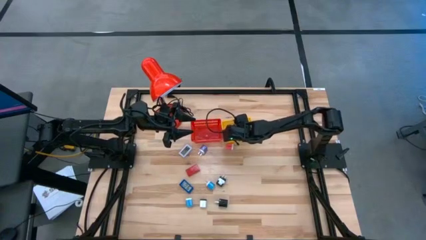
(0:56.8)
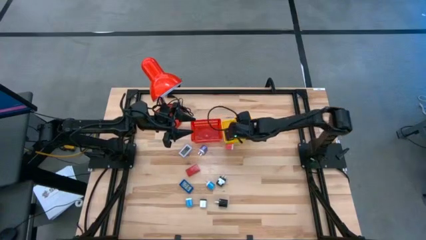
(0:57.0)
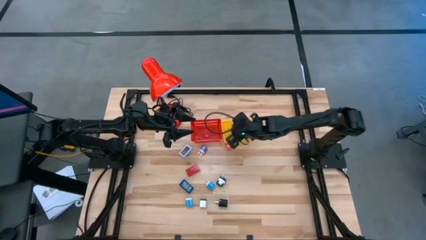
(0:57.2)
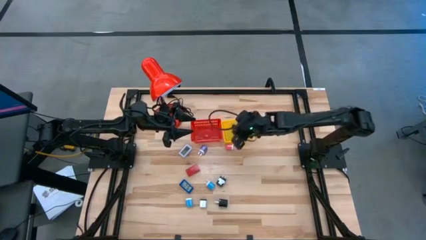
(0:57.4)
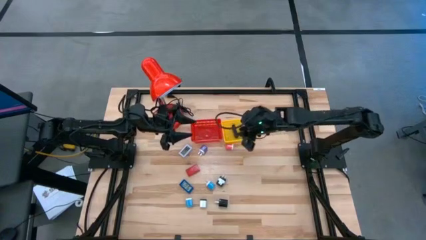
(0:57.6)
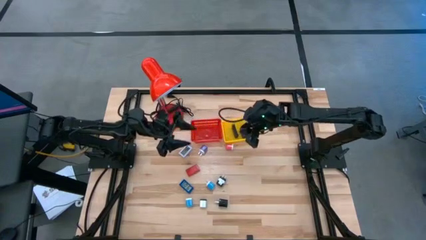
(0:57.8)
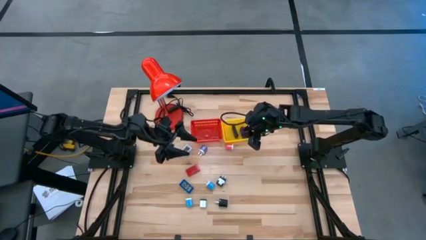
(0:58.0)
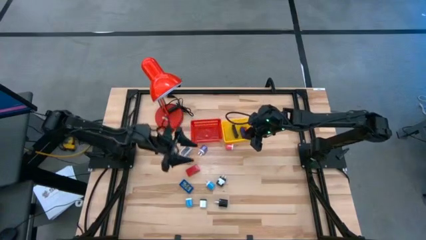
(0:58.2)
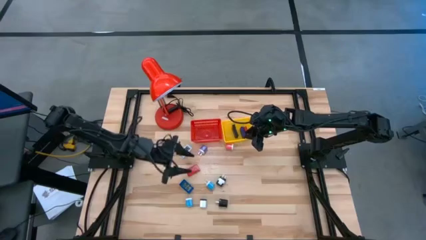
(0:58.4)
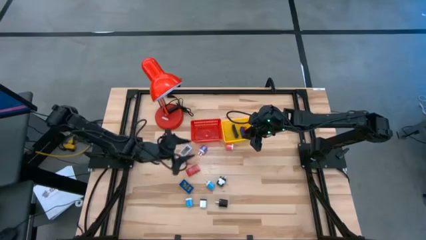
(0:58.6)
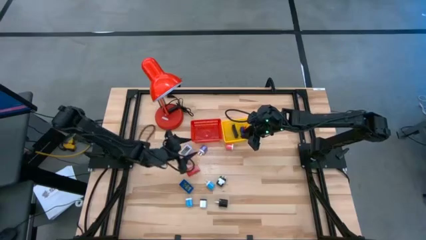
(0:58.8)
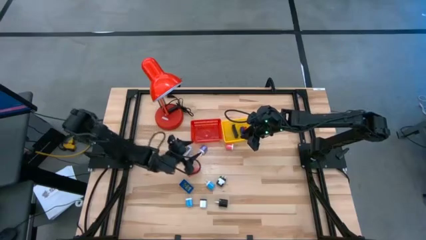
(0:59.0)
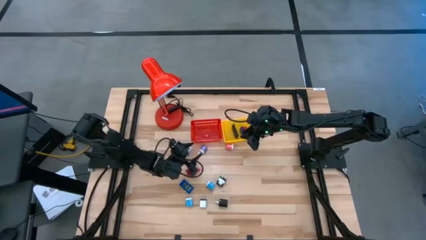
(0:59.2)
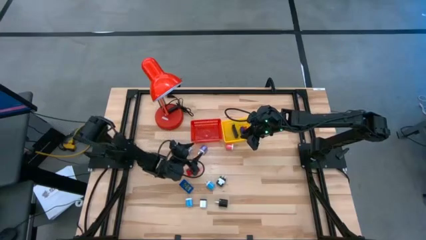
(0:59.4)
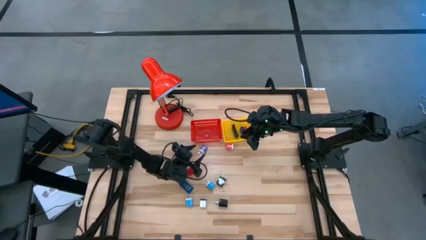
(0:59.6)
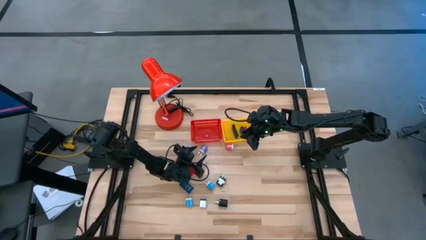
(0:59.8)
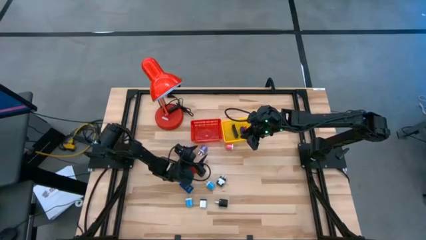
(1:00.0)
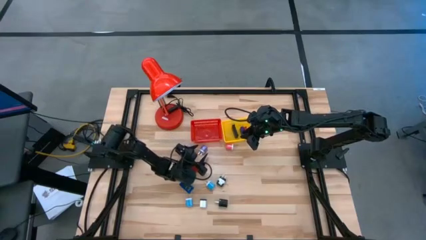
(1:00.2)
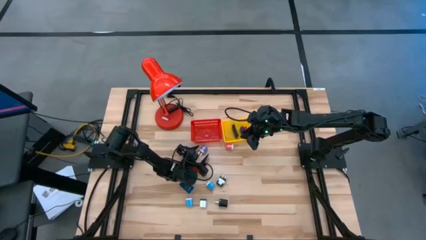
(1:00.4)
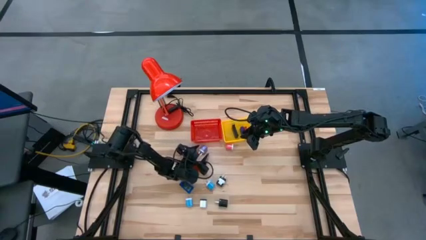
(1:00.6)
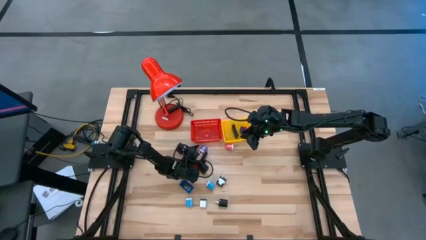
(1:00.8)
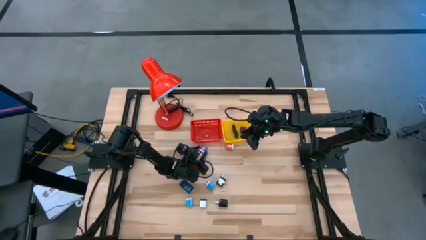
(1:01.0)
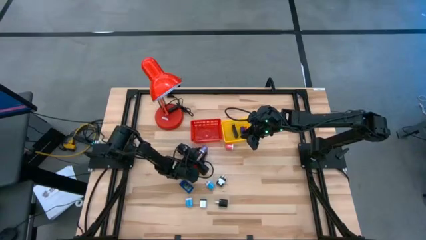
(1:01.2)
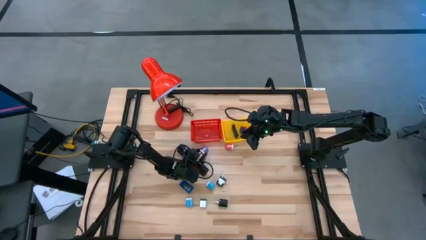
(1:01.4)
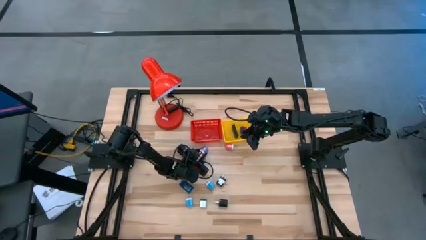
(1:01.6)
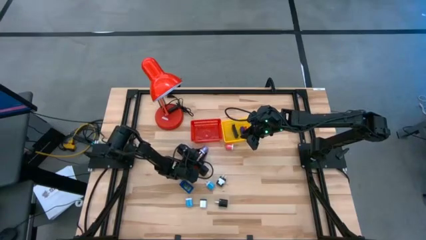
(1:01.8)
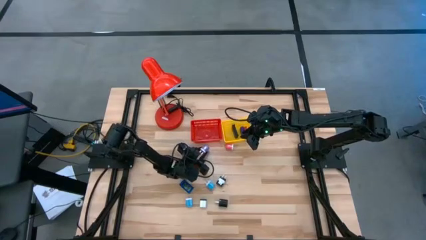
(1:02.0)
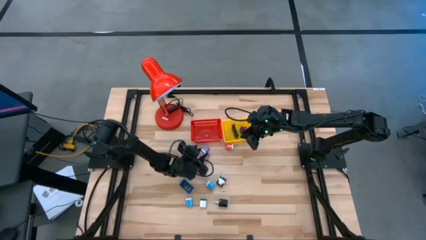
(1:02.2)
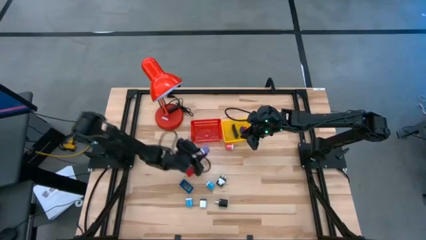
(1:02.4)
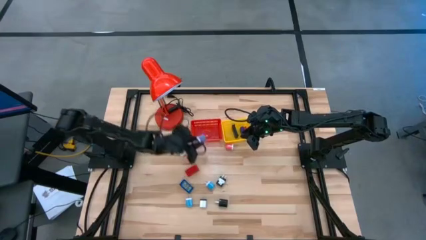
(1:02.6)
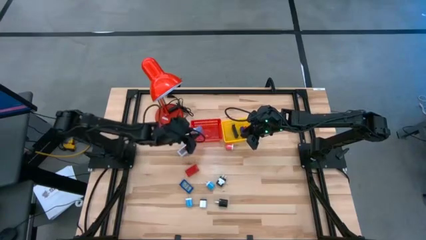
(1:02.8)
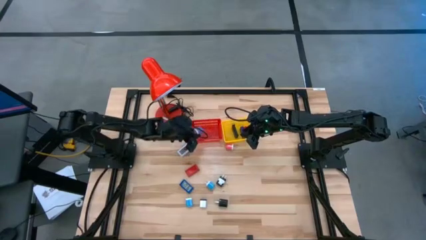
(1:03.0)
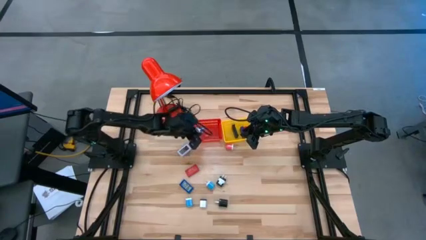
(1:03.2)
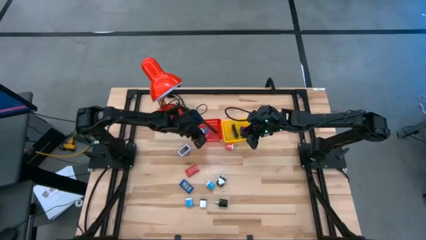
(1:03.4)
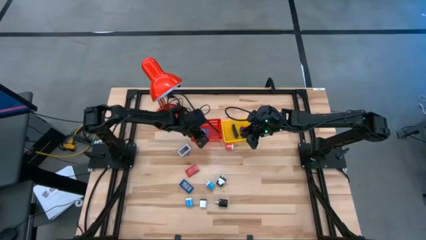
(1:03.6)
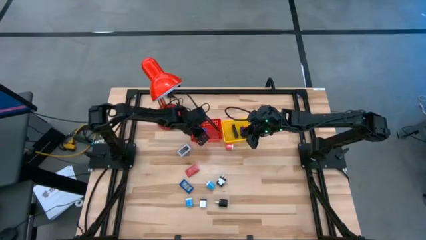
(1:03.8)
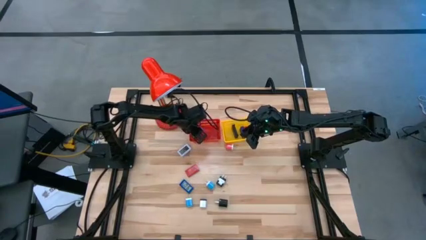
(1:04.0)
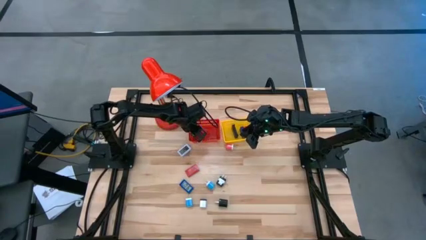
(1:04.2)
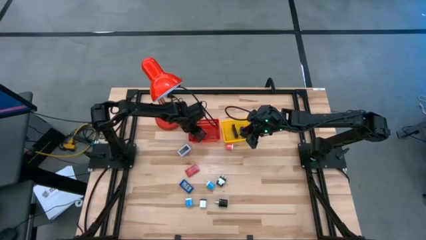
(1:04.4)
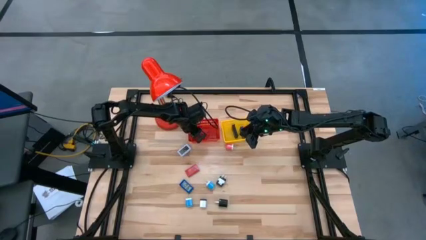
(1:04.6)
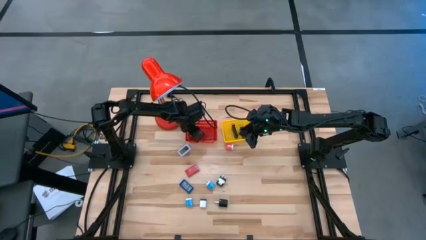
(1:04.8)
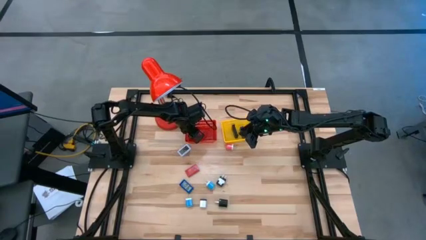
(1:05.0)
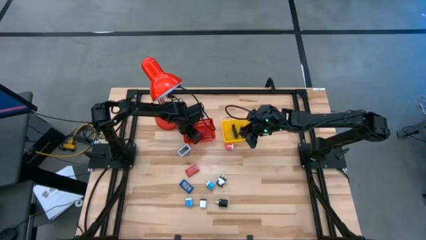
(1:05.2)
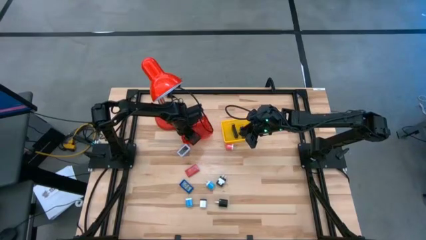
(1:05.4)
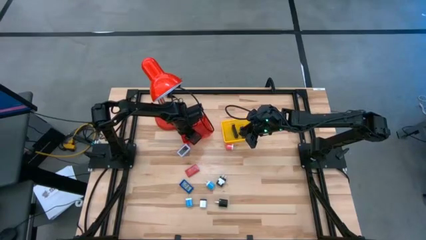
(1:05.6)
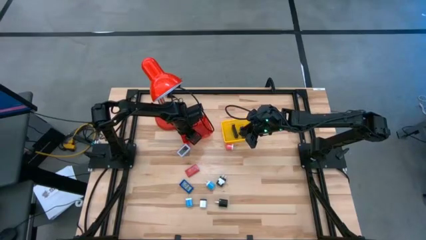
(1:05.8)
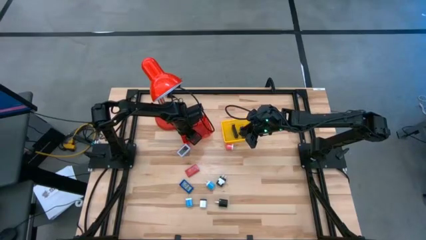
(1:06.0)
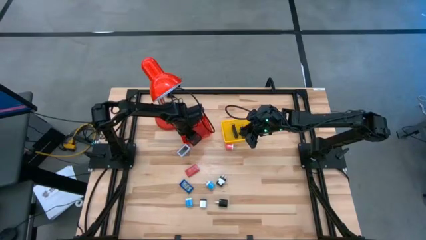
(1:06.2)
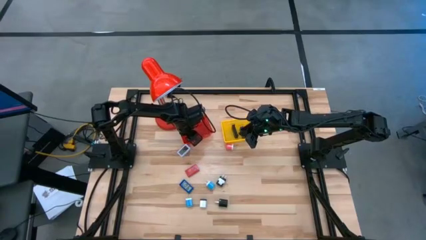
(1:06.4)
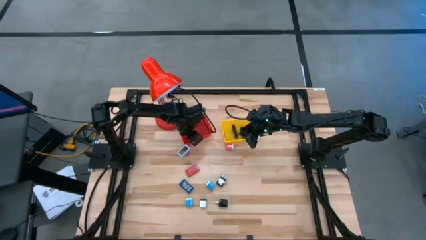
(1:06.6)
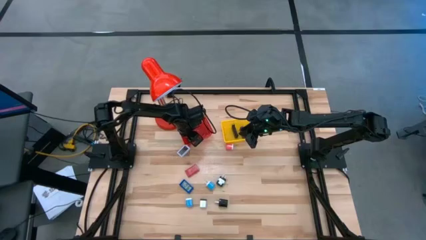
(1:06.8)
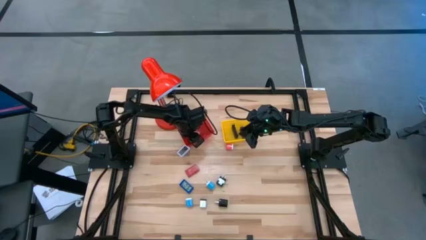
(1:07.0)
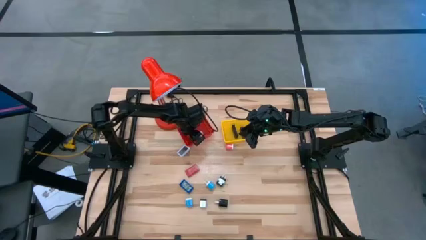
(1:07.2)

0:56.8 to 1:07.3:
Task: Pick & Place Office items
Put the purple charger adapter into the red bin
